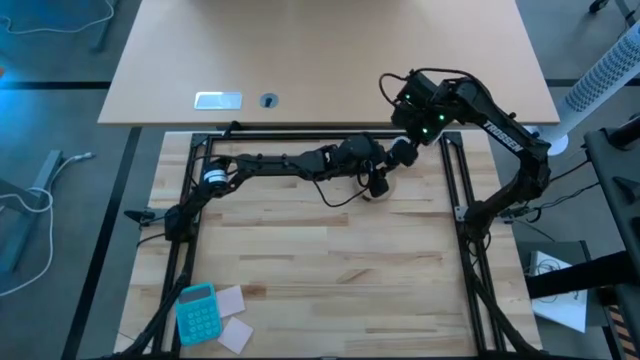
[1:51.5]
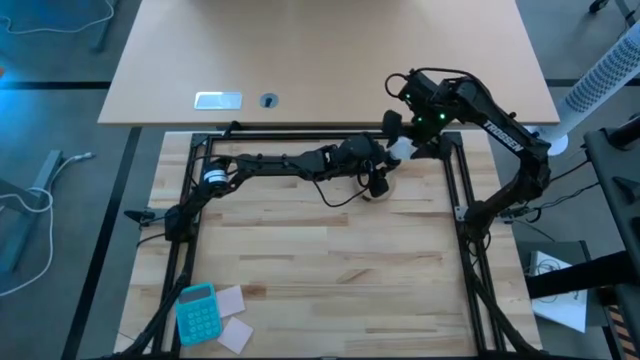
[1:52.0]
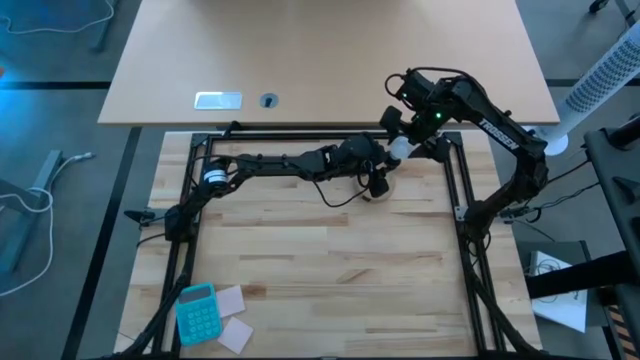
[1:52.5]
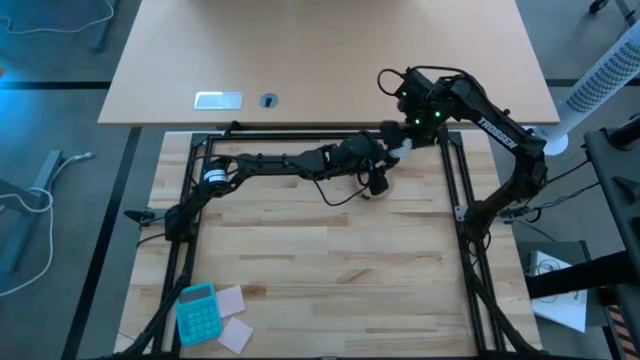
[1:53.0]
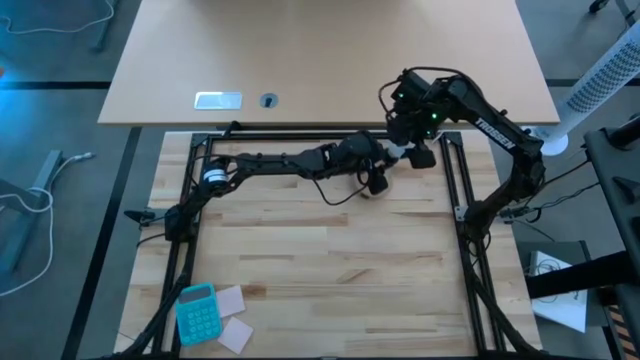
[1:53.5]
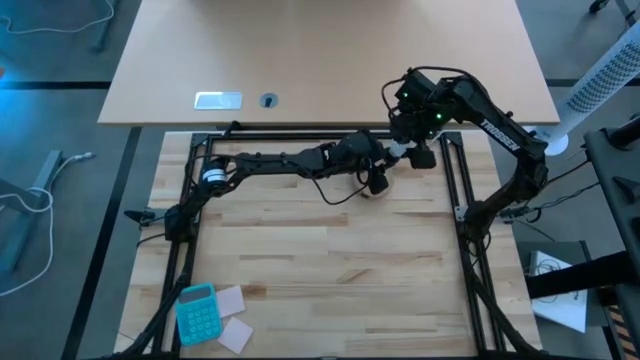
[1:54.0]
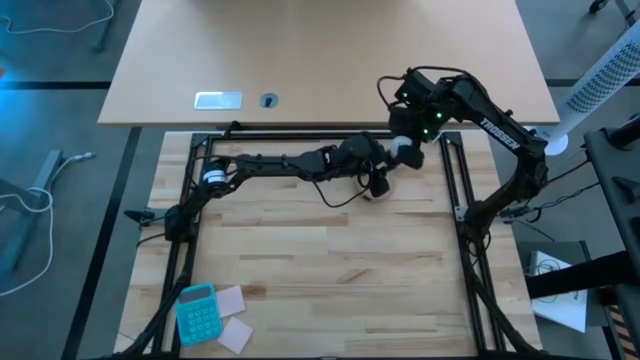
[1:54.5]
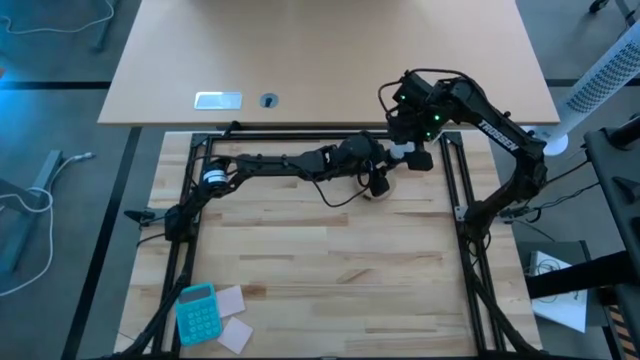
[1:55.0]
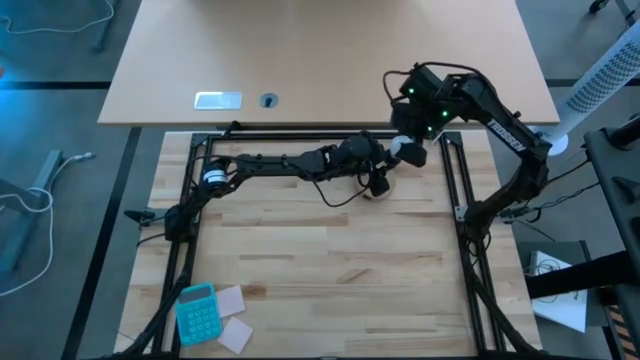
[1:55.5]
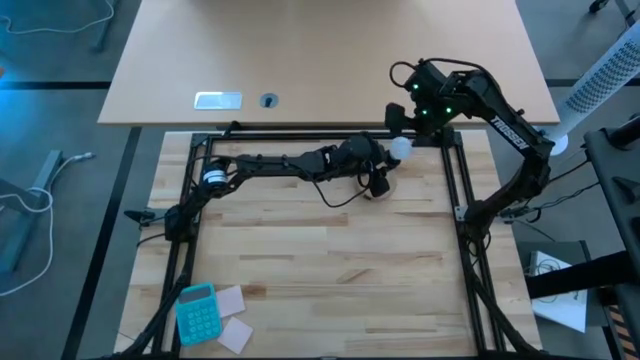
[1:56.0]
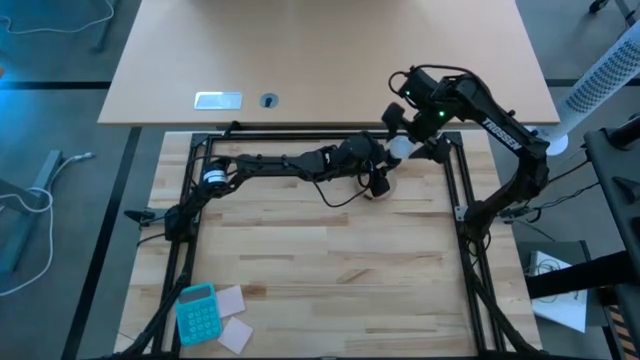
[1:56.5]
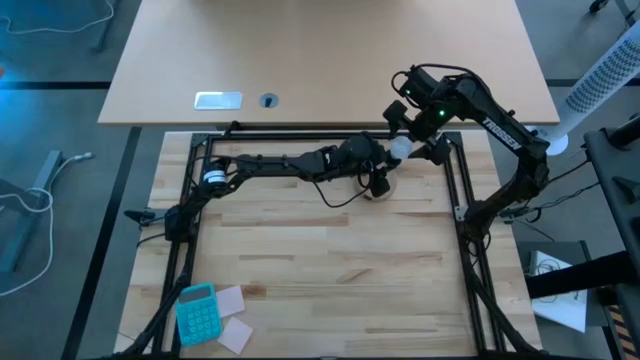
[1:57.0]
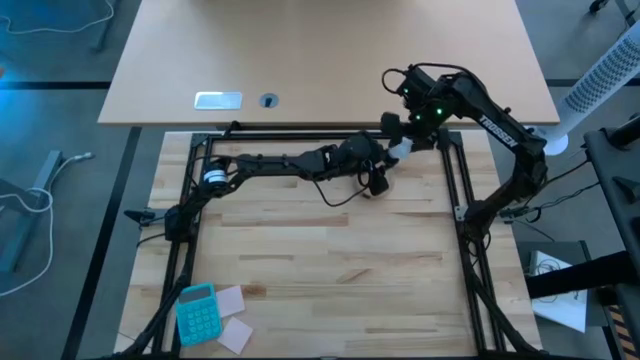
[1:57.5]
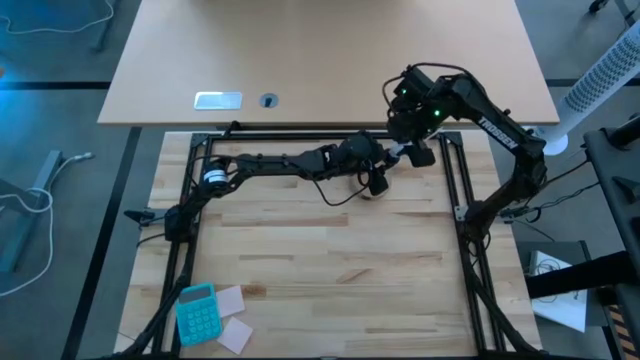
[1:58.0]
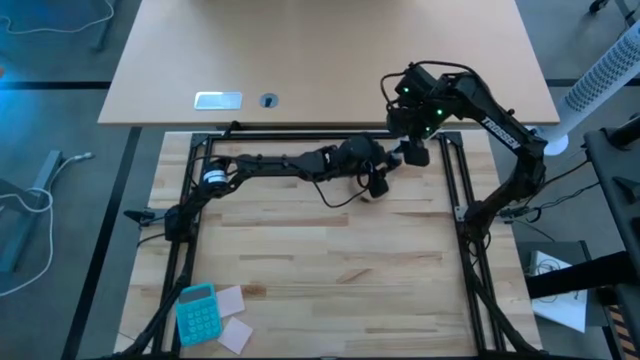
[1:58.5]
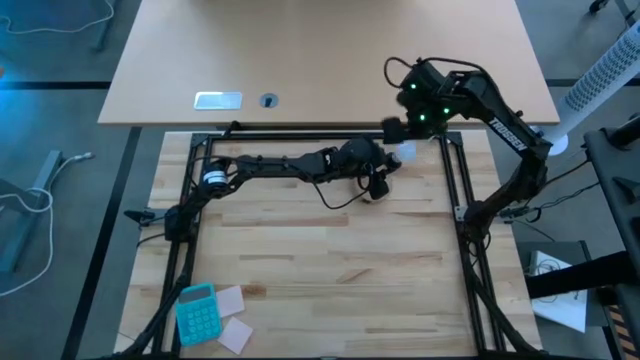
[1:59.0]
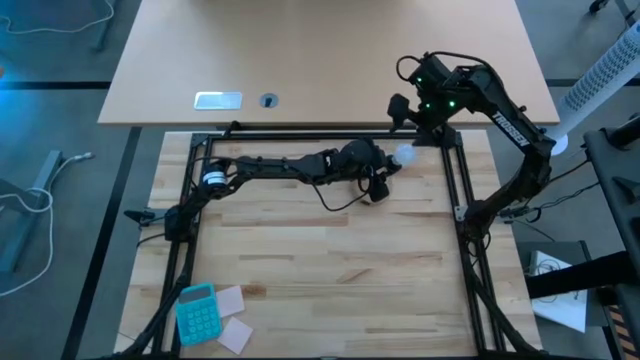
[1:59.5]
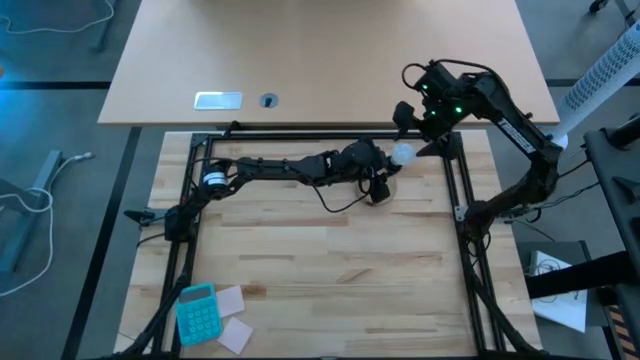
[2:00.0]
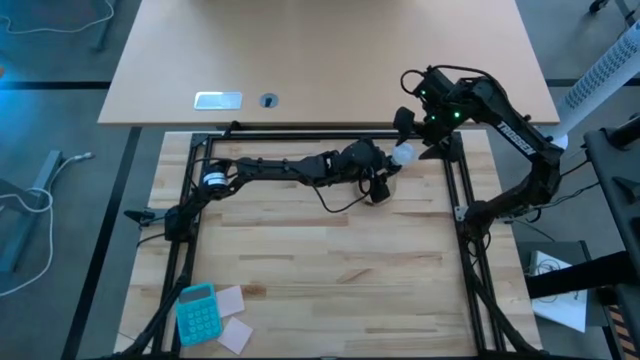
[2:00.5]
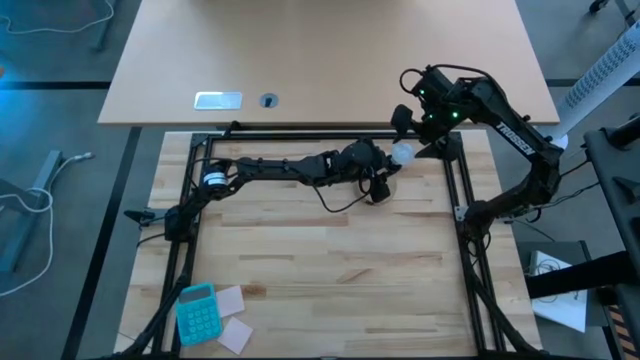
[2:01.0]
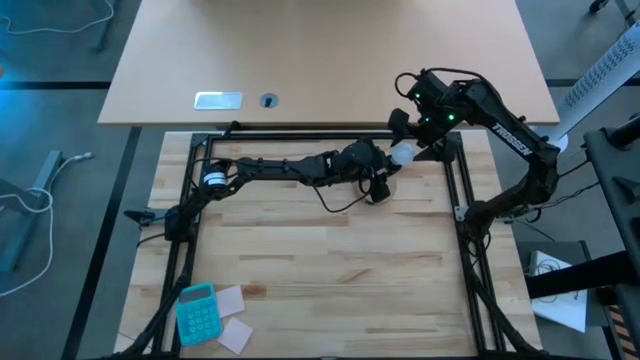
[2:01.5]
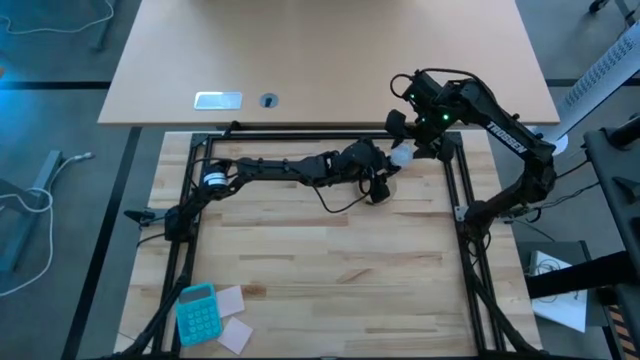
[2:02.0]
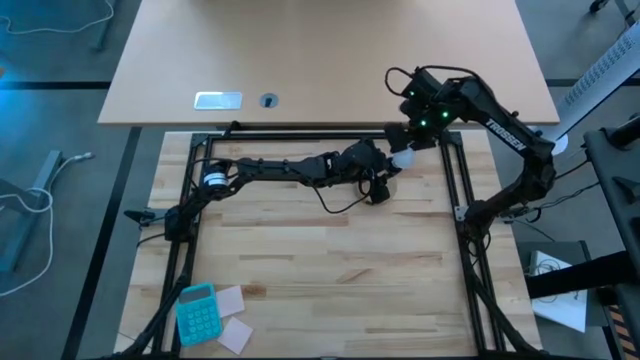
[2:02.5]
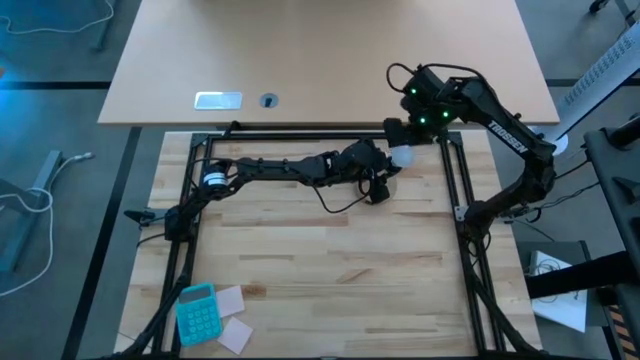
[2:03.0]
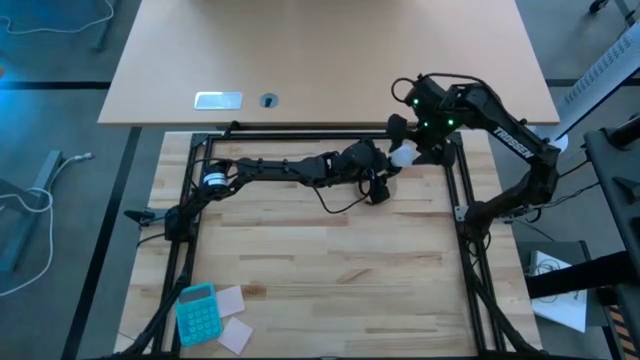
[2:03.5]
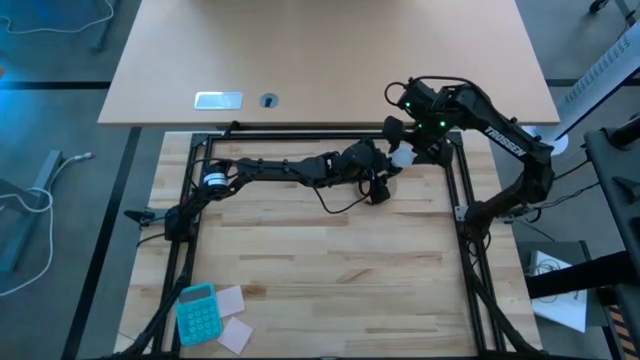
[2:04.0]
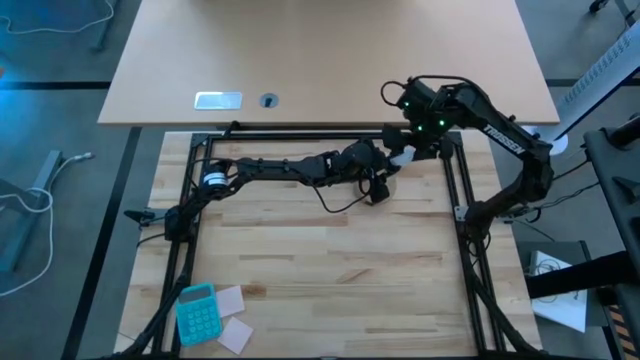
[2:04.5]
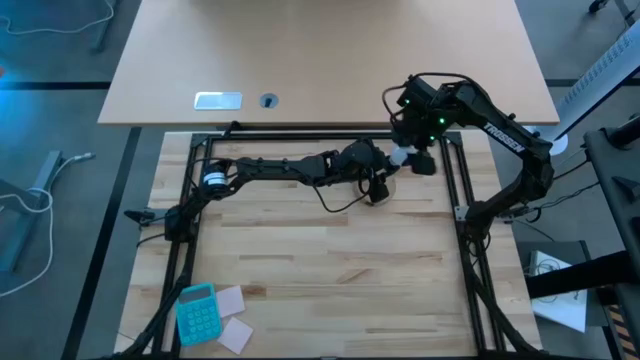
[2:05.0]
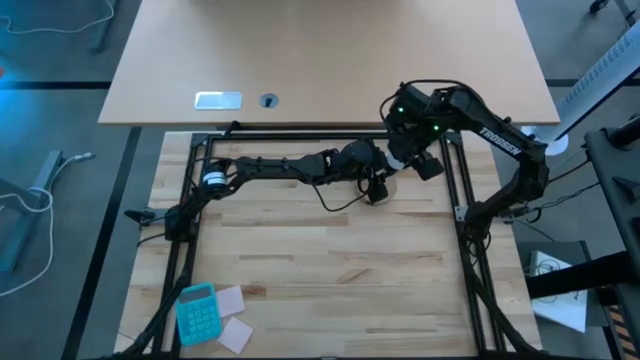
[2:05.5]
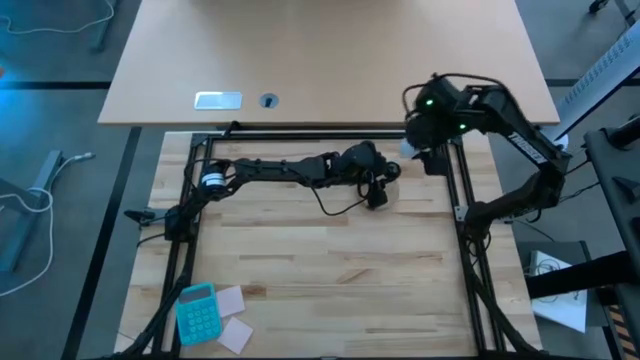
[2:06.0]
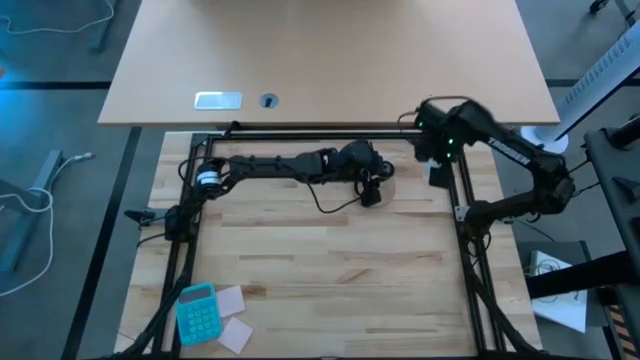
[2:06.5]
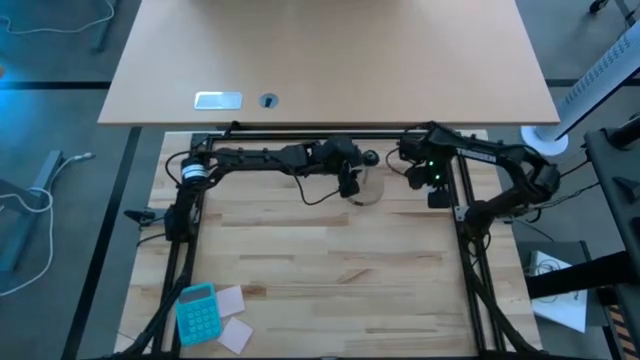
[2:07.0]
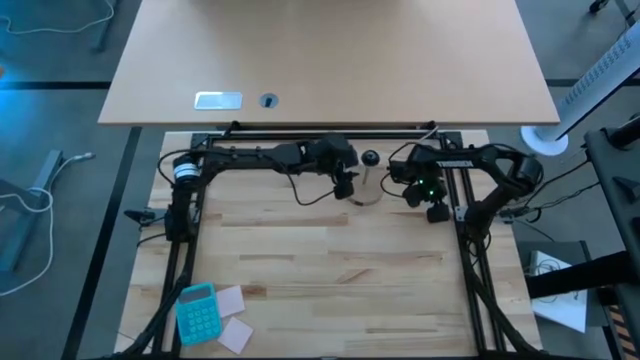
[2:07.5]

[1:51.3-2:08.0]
Task: Screw lightbulb
Remove the lightbulb from the lamp
